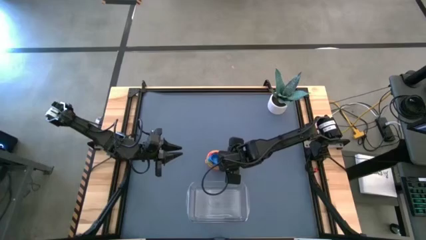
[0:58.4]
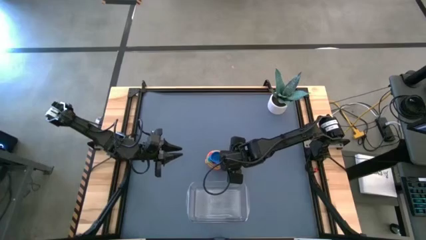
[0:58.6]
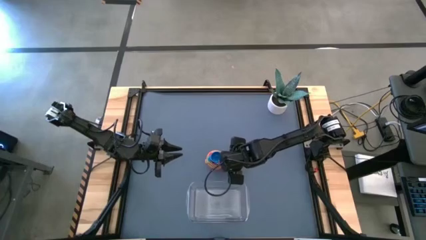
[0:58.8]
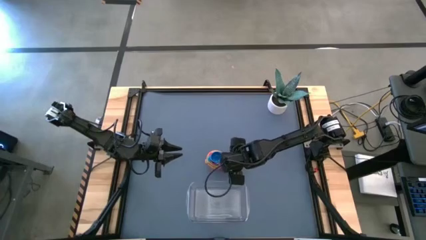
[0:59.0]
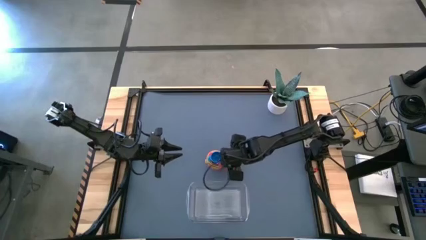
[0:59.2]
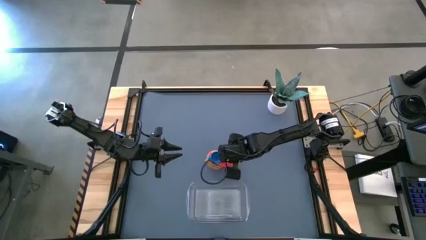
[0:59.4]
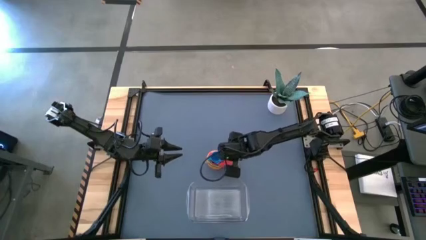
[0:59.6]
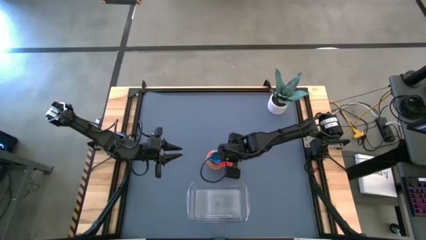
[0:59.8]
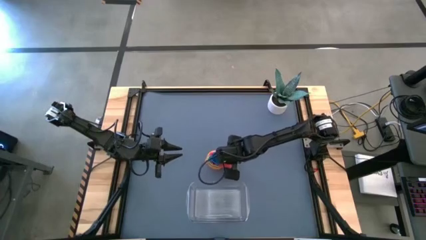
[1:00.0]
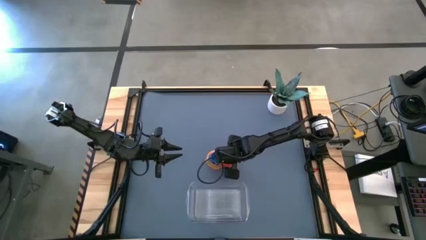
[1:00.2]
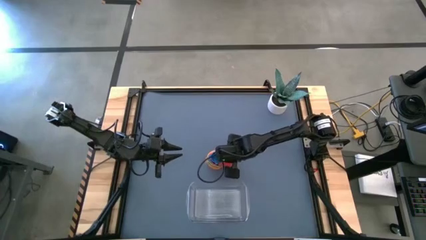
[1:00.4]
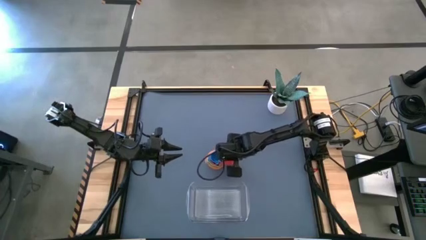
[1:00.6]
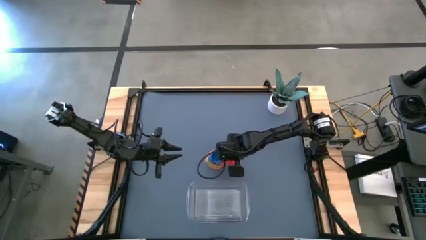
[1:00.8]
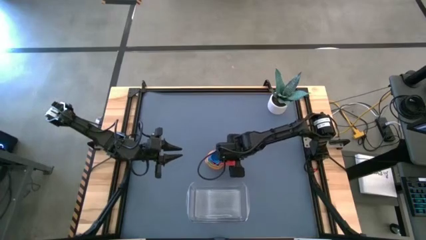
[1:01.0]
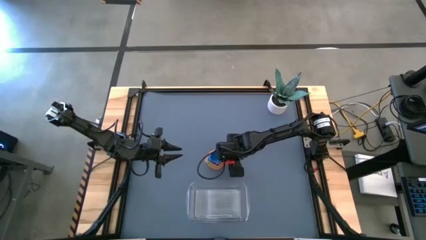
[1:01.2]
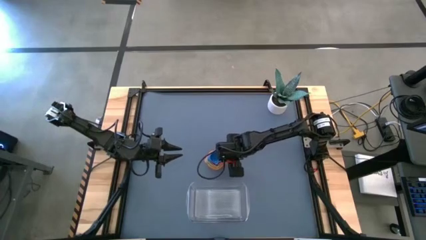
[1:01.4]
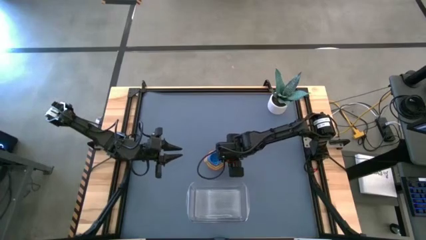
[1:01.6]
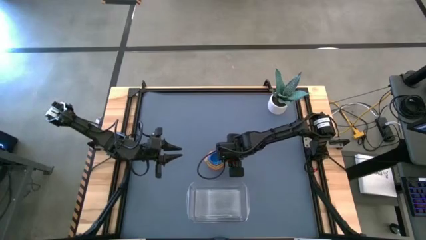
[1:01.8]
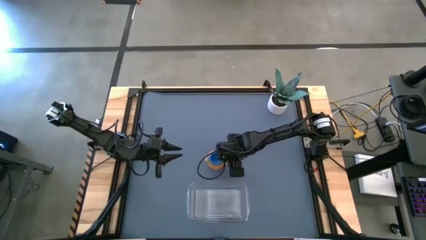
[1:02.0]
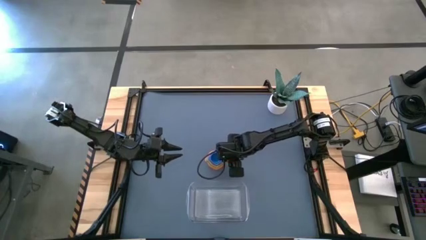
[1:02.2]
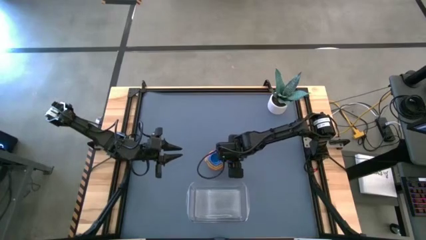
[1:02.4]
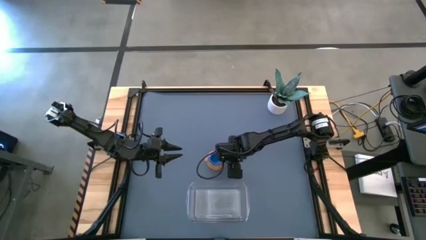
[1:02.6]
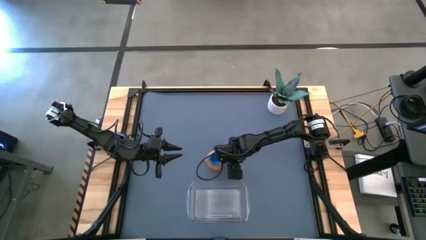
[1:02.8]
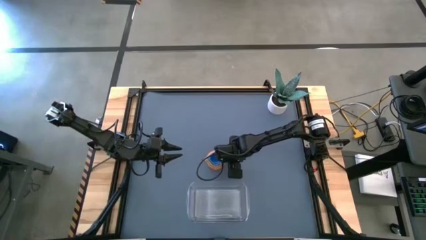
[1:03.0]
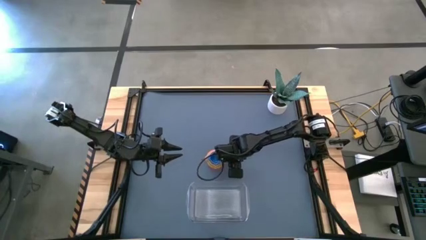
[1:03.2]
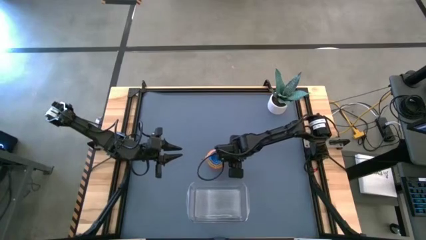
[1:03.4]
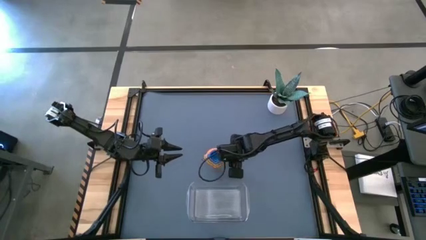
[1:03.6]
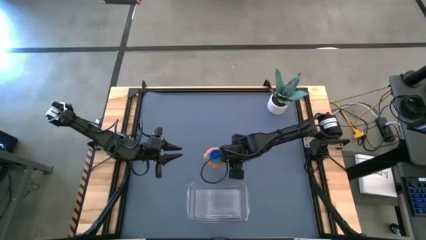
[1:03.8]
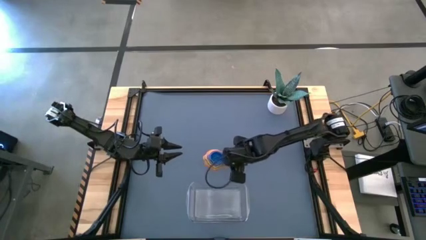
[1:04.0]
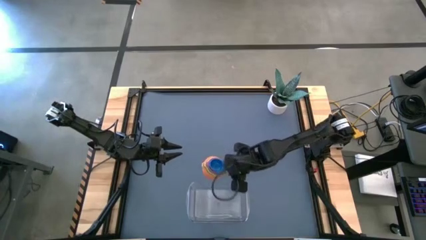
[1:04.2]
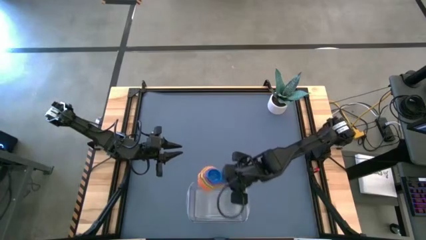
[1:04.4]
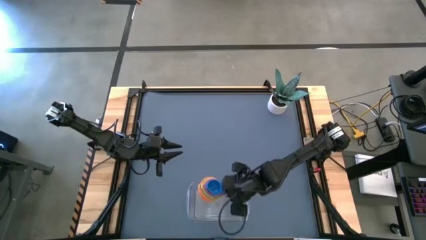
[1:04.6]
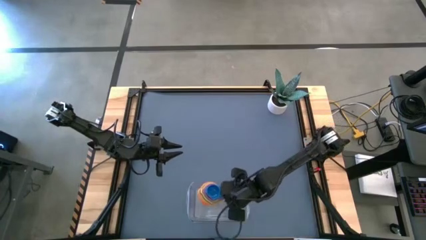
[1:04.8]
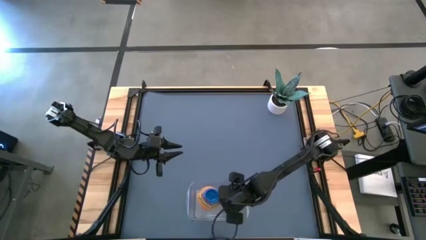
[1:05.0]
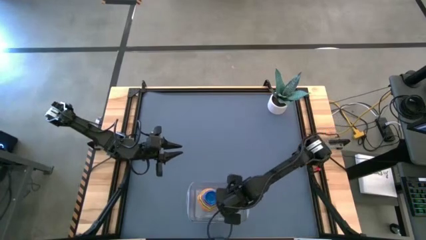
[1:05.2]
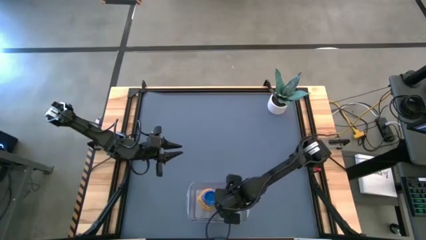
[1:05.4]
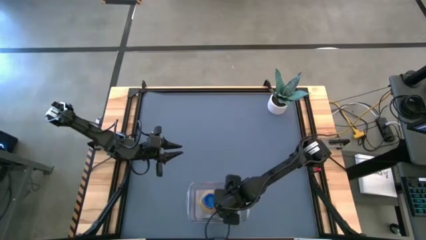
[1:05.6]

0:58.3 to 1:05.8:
Task: Nest measuring cups in basket
Put the stacked measuring cups into the transparent bin

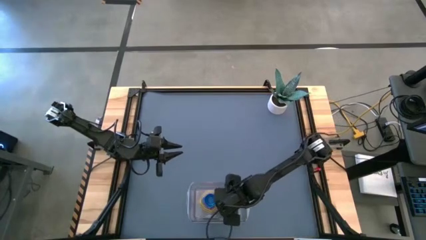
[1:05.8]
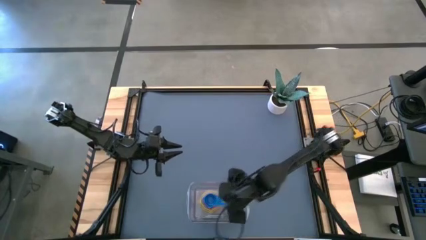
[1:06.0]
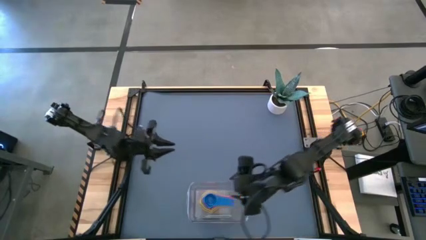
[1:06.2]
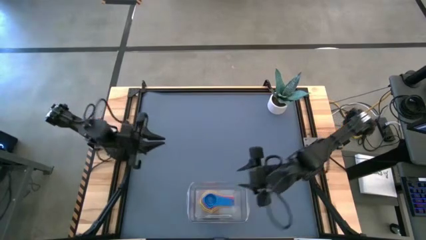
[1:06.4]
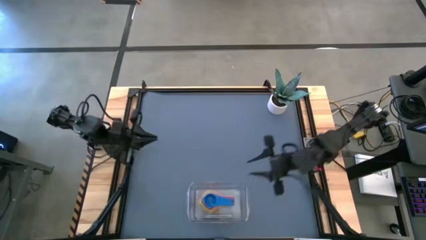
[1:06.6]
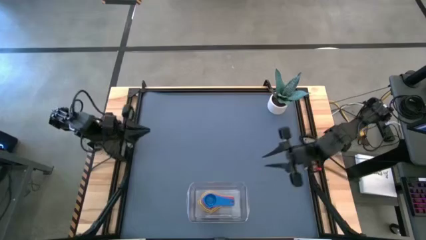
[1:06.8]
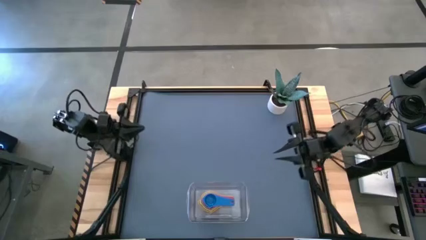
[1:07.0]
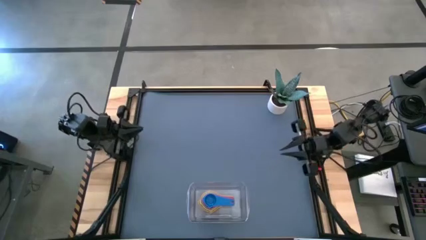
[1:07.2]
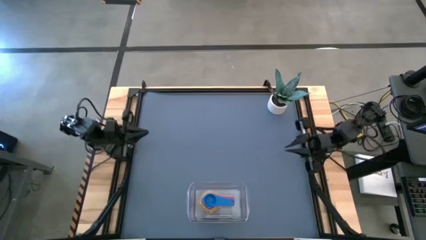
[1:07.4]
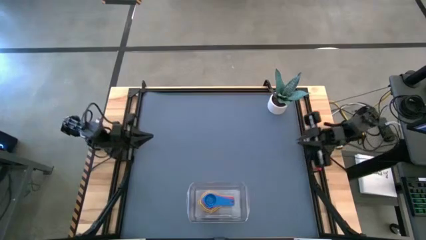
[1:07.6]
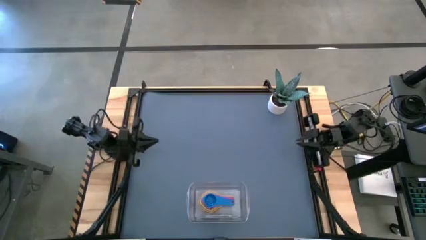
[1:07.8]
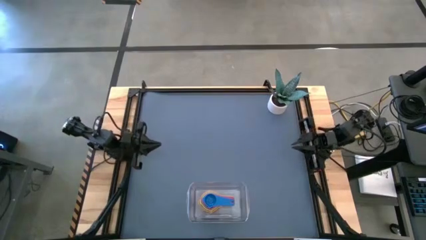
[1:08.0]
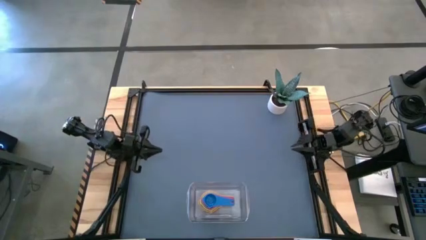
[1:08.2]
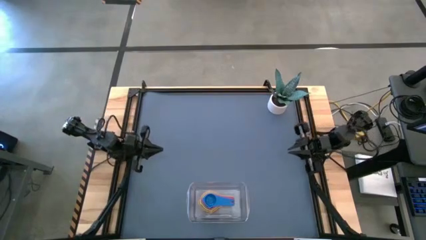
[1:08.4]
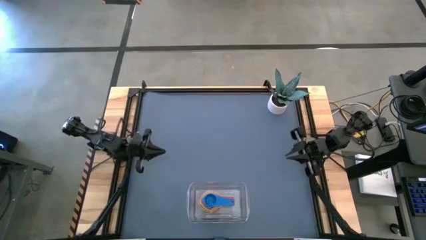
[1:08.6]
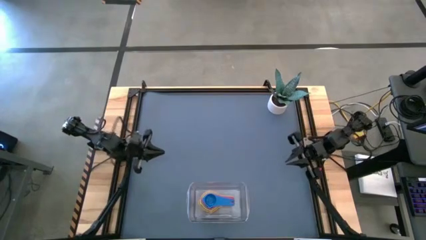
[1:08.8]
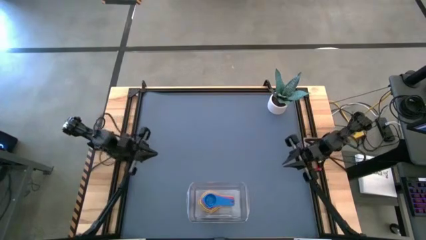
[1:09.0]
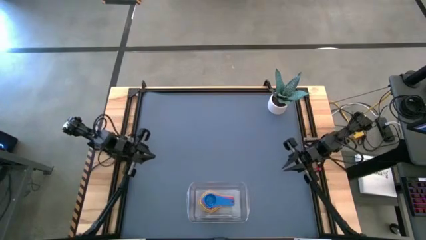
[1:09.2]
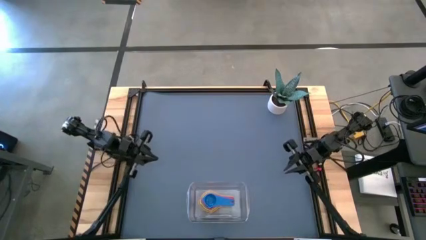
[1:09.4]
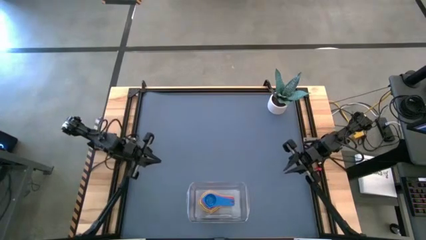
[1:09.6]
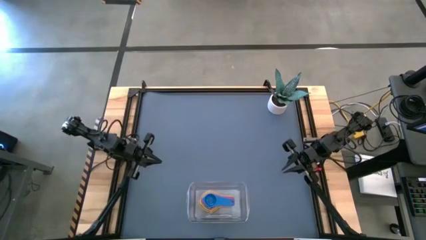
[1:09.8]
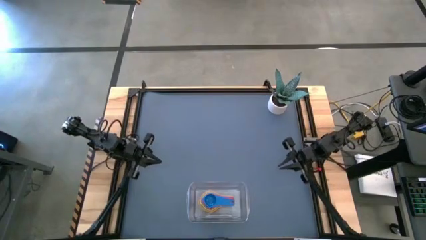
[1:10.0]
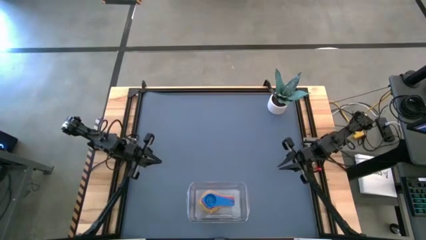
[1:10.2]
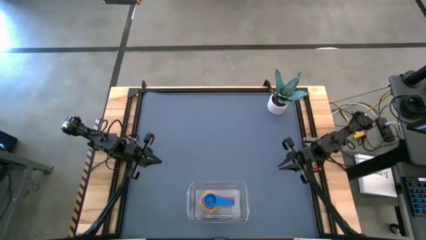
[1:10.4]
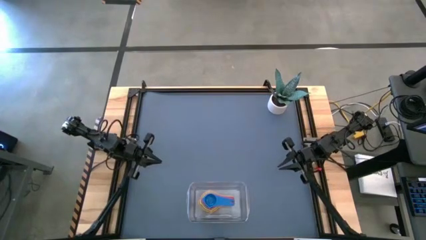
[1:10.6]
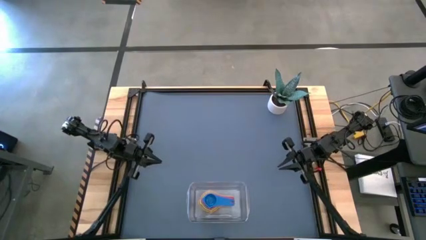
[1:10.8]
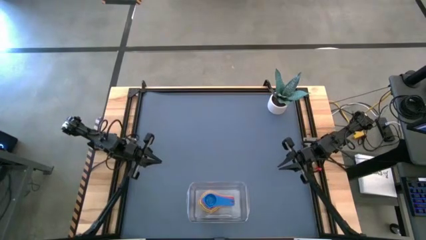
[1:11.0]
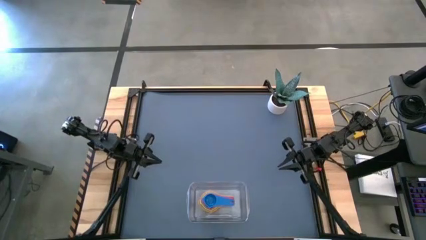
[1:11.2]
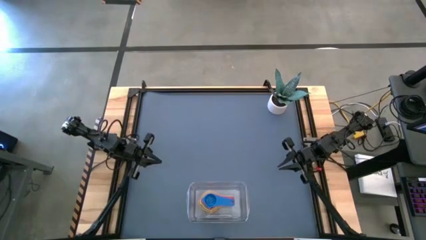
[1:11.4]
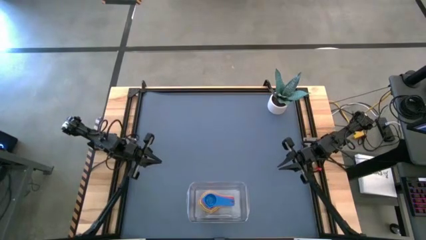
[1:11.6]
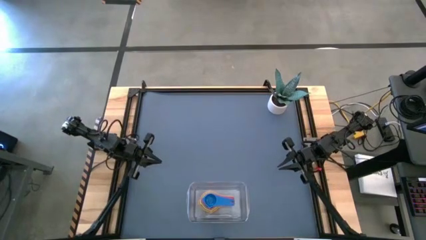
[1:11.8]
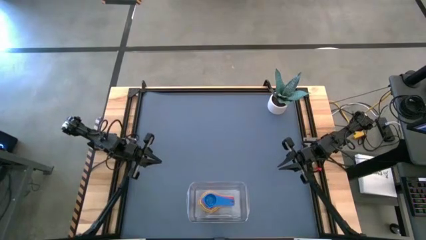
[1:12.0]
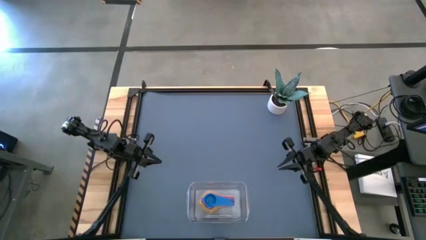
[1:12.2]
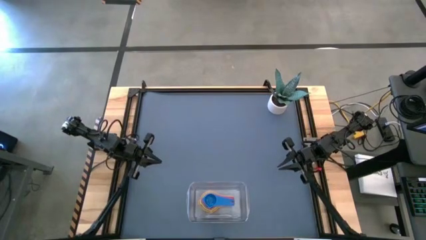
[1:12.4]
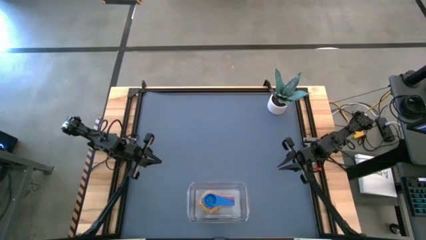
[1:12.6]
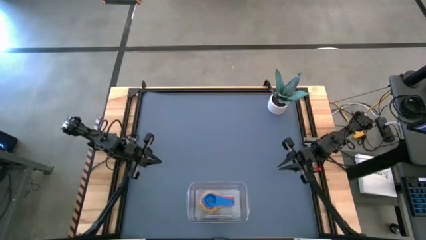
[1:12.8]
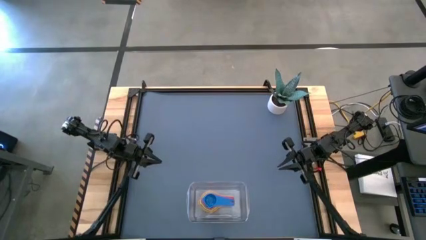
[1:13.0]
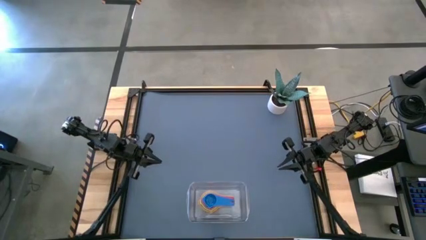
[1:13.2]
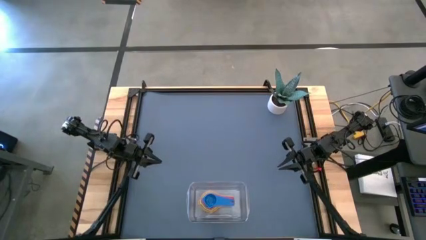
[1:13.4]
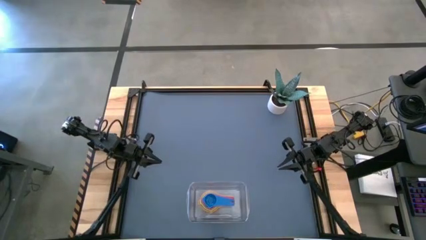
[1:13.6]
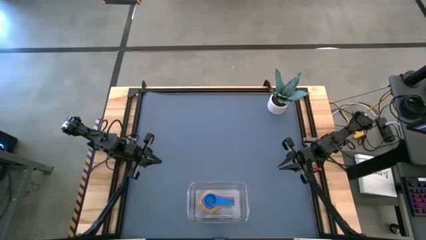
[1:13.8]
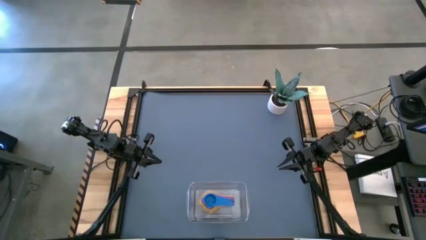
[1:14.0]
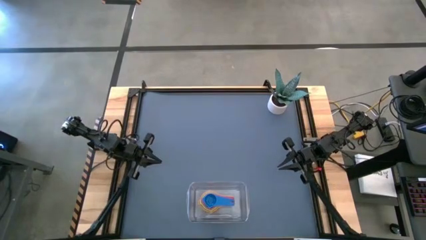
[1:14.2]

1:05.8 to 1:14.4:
Return to Home Position

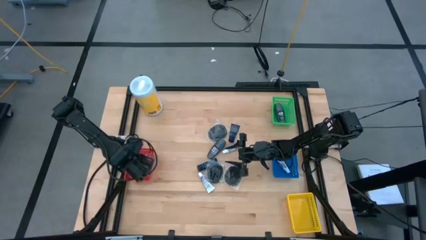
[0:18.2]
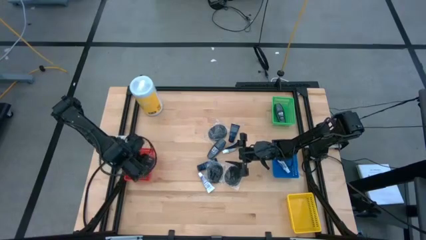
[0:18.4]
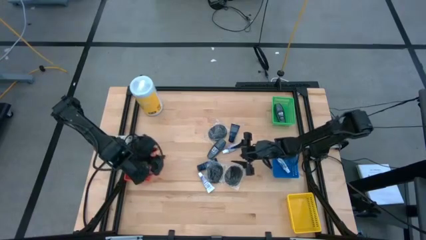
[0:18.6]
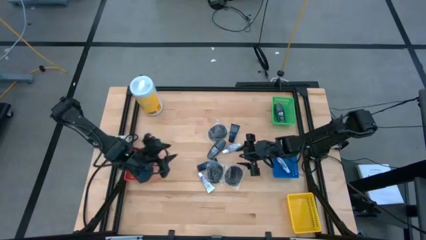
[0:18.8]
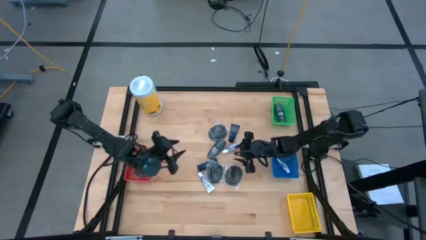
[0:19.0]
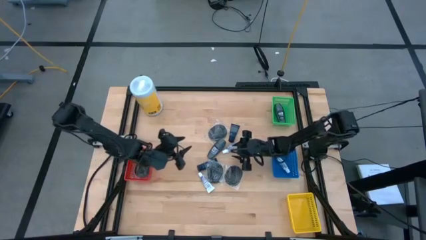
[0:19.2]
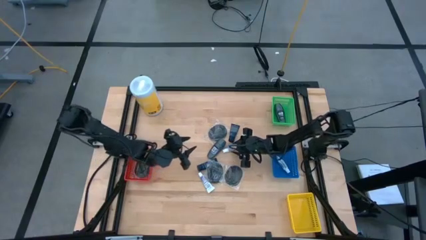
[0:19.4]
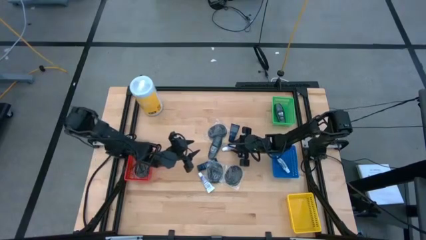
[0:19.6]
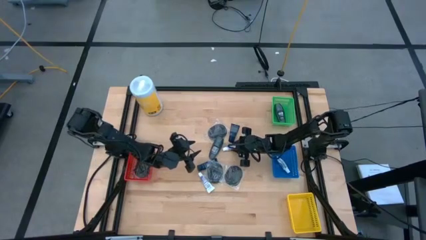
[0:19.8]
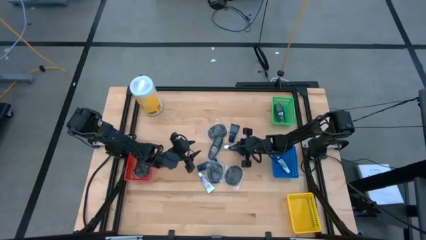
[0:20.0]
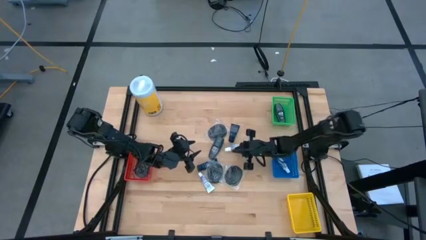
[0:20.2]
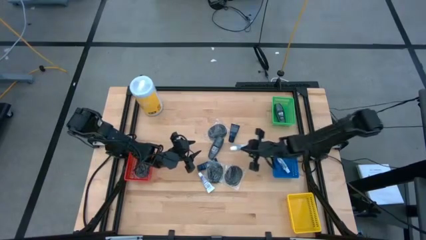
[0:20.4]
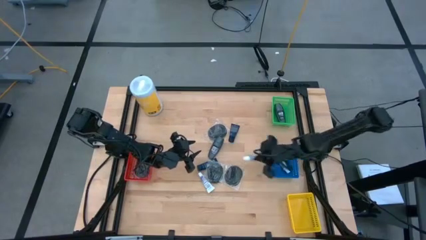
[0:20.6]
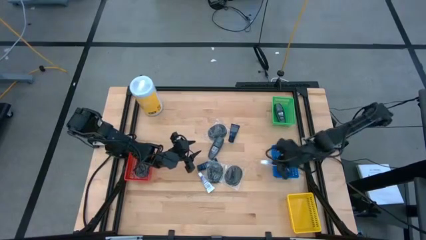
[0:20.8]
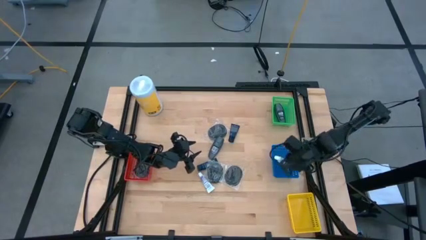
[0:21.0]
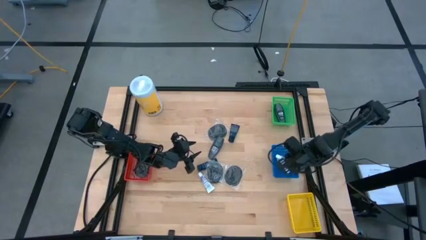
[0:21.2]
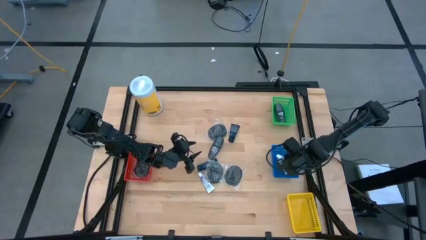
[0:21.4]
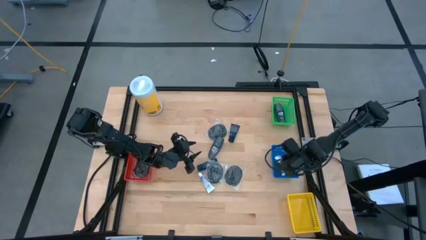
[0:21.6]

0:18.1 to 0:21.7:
Task: Pick & Place Travel size toiletries
Put the toothpaste into the blue bin
